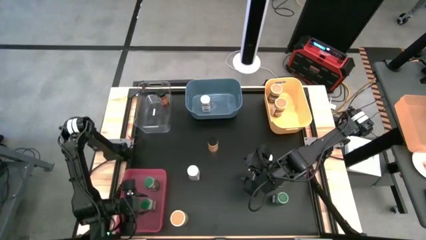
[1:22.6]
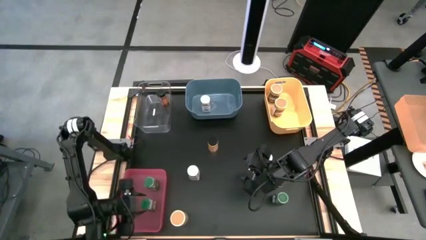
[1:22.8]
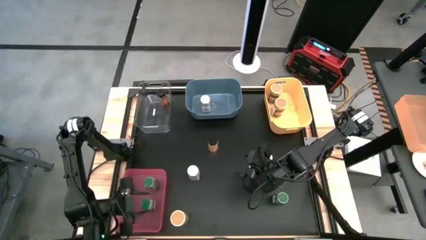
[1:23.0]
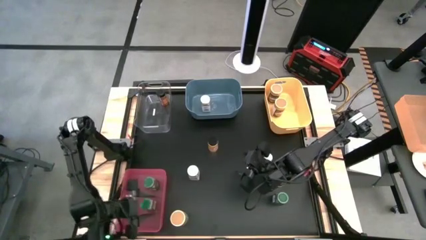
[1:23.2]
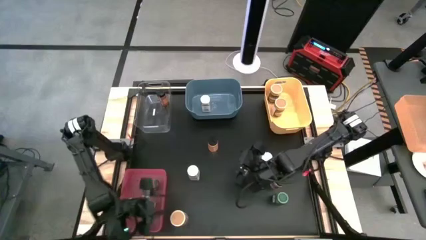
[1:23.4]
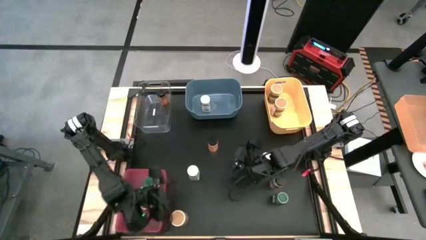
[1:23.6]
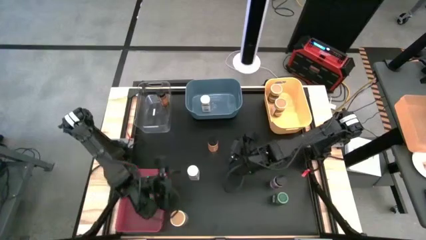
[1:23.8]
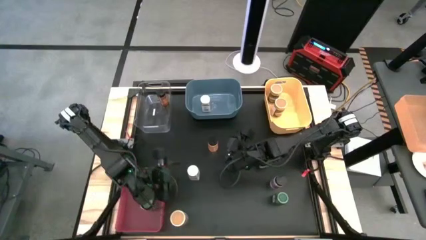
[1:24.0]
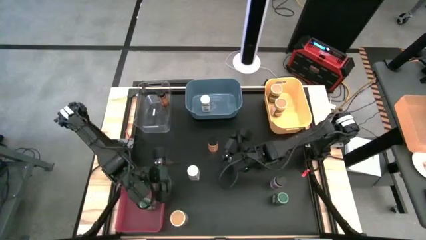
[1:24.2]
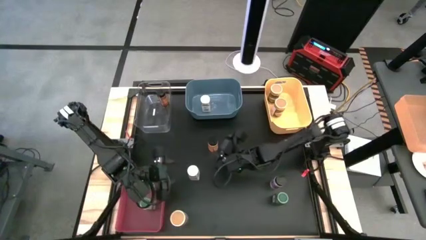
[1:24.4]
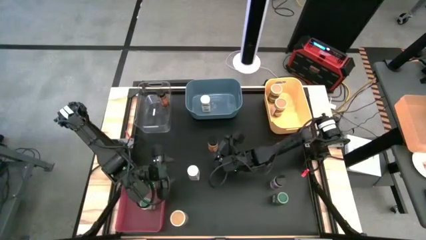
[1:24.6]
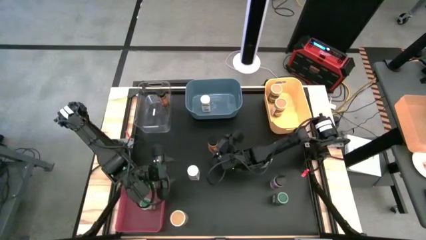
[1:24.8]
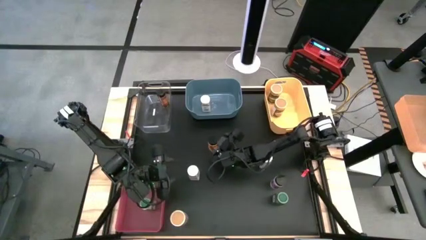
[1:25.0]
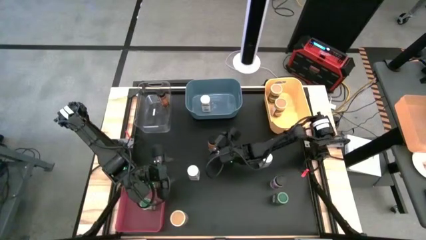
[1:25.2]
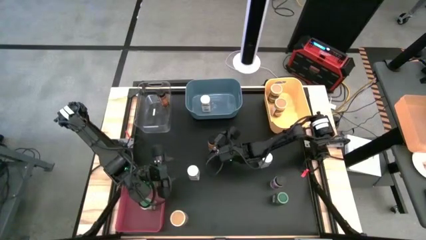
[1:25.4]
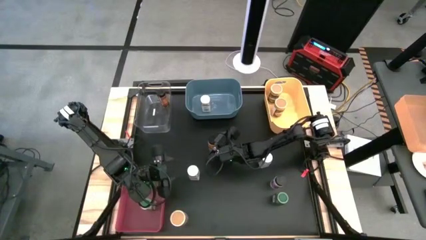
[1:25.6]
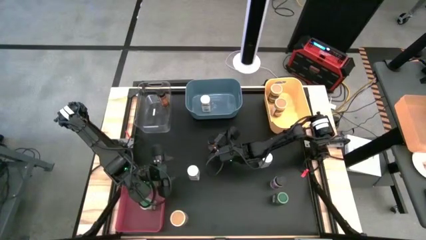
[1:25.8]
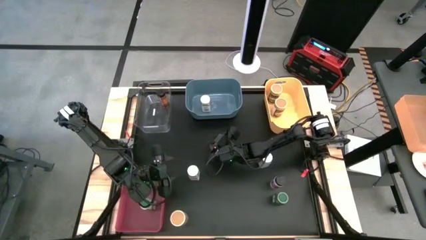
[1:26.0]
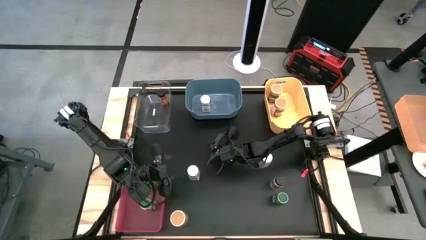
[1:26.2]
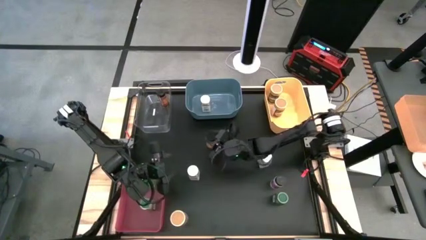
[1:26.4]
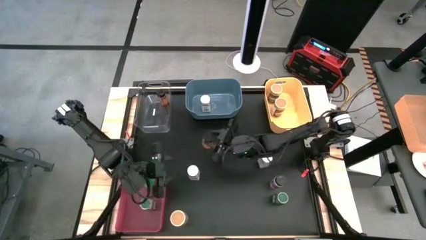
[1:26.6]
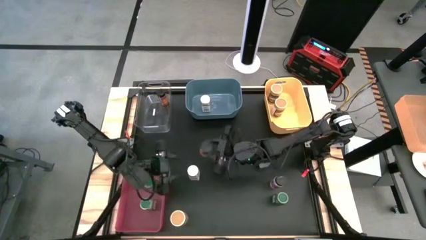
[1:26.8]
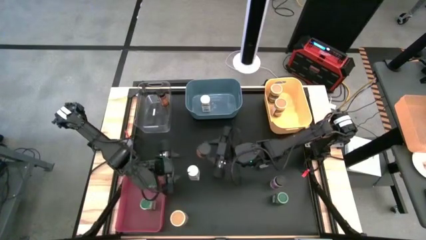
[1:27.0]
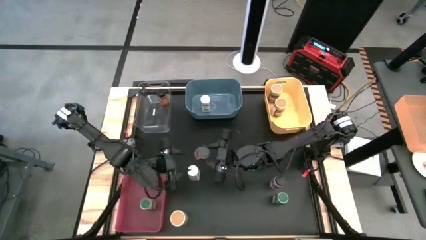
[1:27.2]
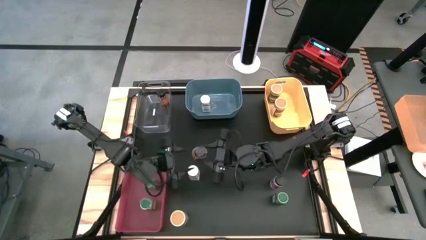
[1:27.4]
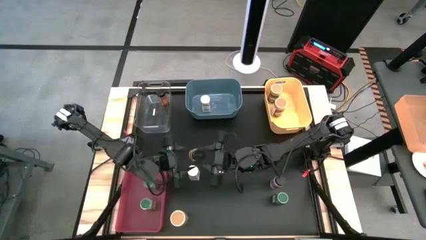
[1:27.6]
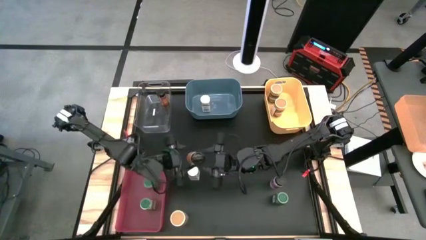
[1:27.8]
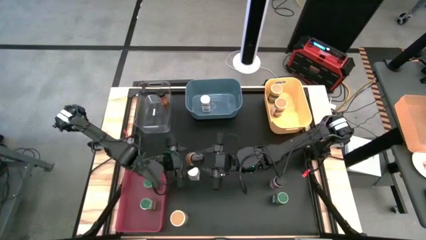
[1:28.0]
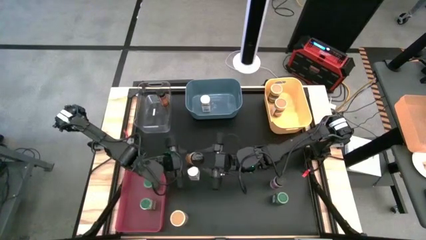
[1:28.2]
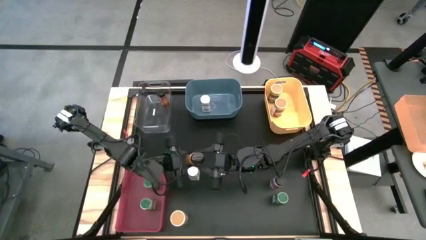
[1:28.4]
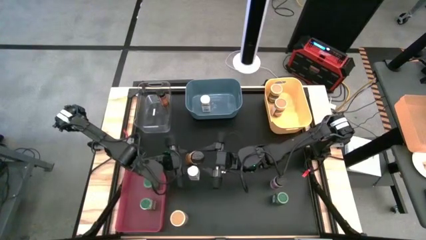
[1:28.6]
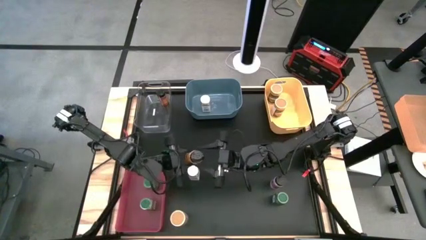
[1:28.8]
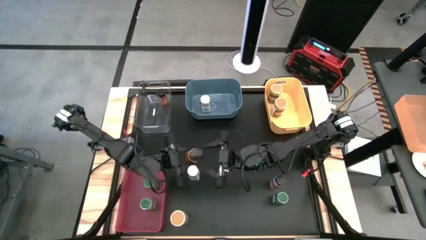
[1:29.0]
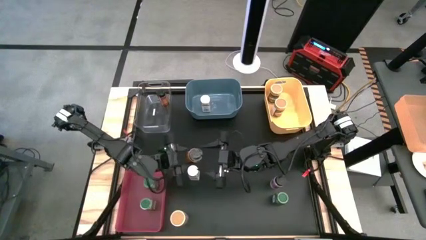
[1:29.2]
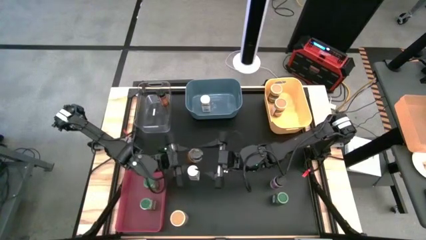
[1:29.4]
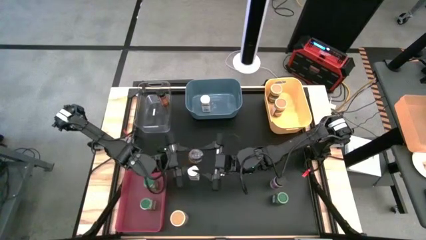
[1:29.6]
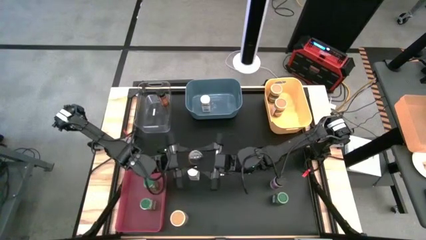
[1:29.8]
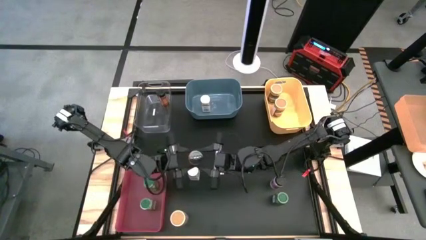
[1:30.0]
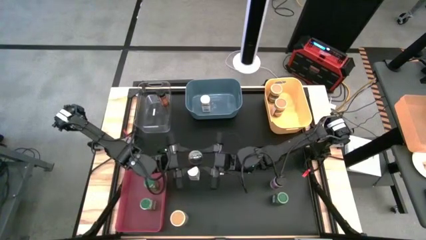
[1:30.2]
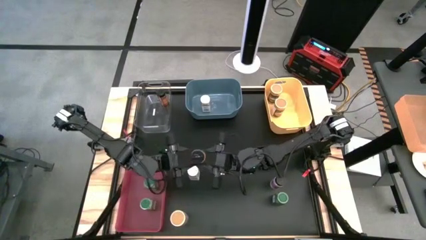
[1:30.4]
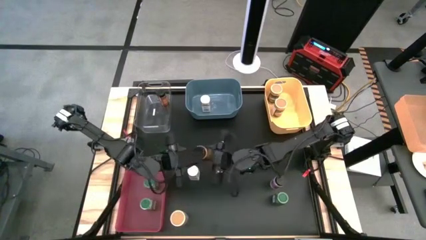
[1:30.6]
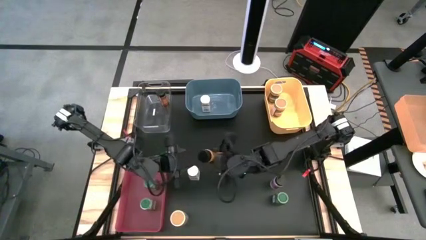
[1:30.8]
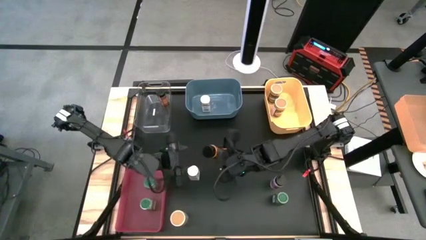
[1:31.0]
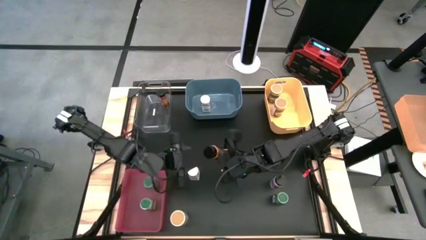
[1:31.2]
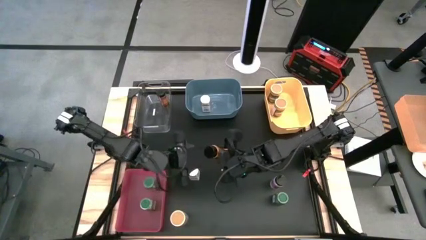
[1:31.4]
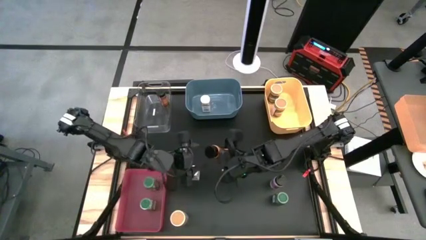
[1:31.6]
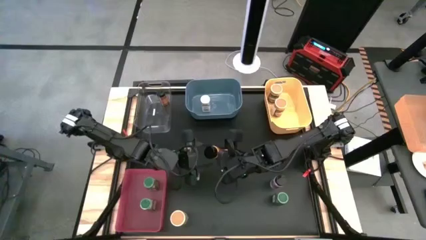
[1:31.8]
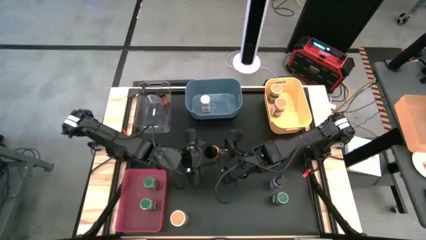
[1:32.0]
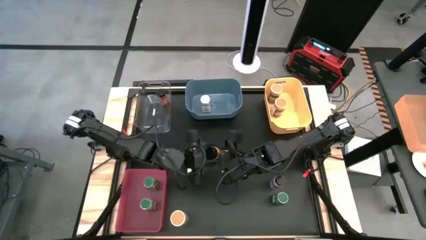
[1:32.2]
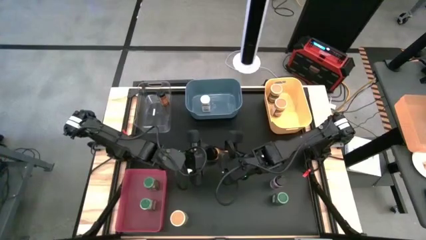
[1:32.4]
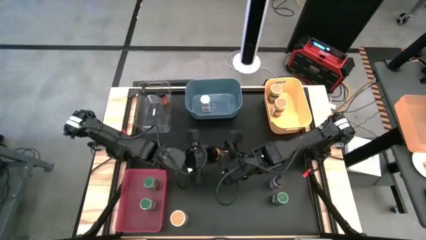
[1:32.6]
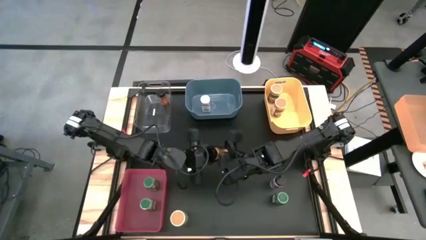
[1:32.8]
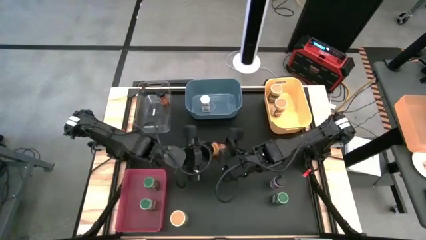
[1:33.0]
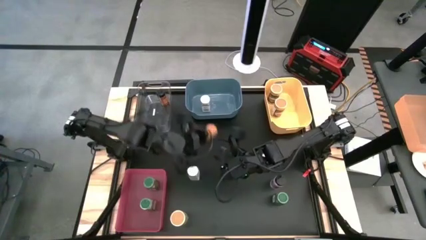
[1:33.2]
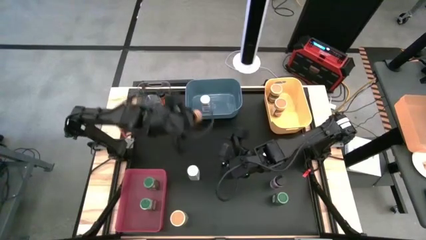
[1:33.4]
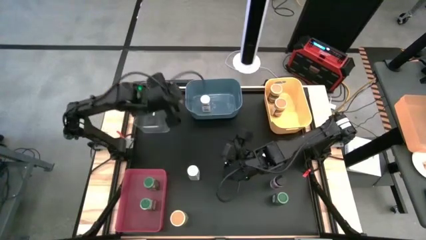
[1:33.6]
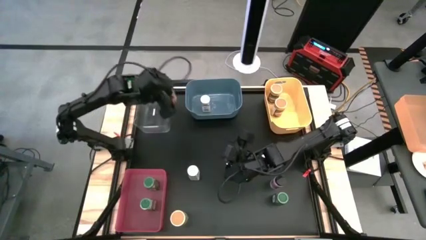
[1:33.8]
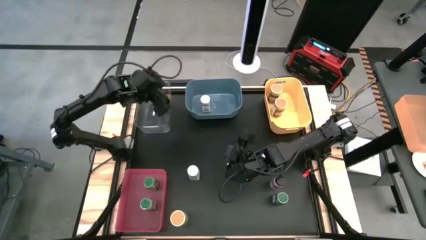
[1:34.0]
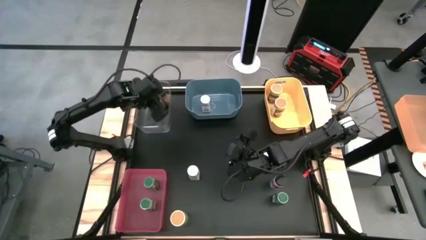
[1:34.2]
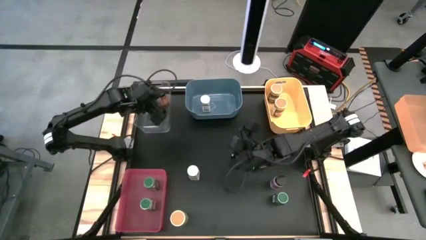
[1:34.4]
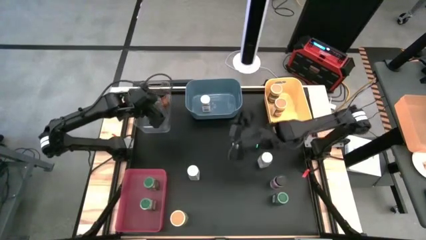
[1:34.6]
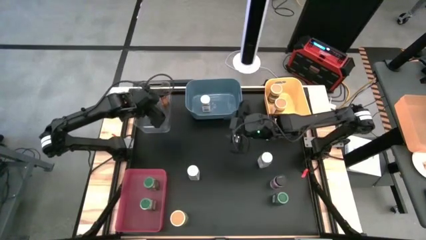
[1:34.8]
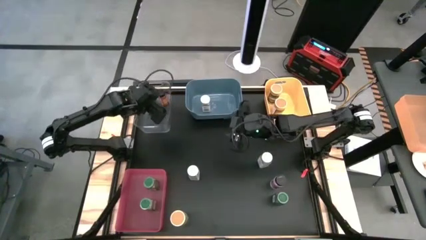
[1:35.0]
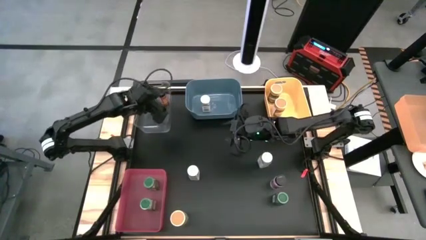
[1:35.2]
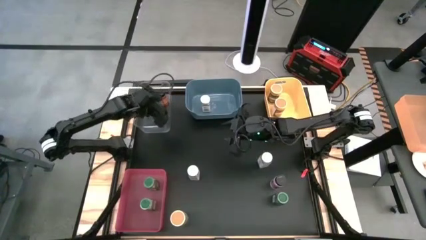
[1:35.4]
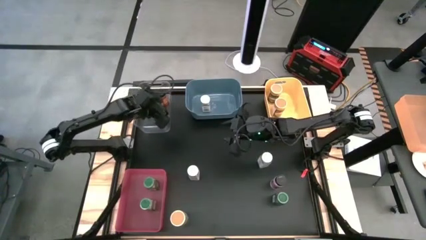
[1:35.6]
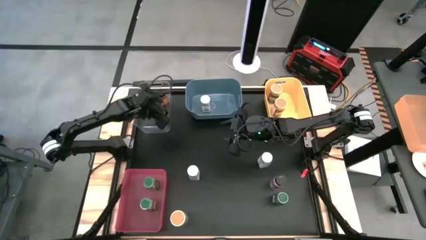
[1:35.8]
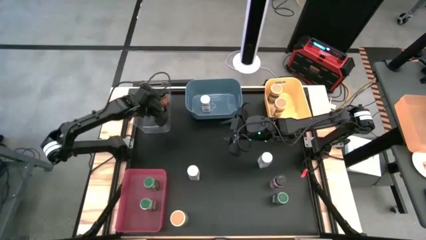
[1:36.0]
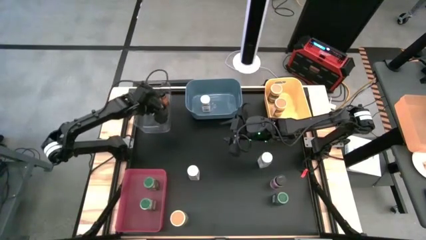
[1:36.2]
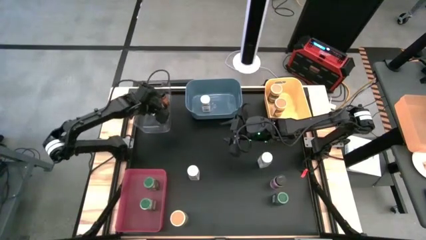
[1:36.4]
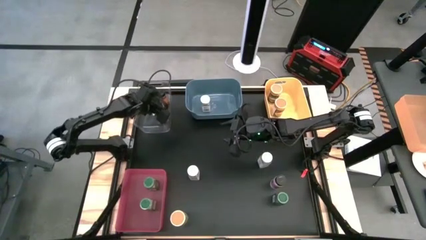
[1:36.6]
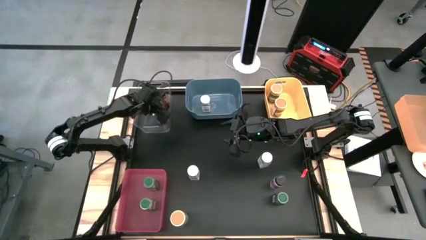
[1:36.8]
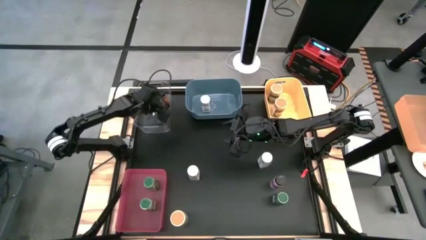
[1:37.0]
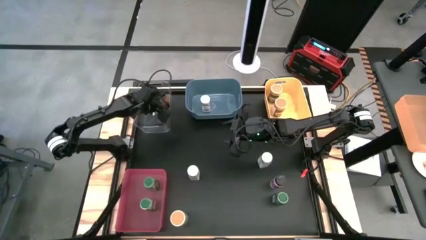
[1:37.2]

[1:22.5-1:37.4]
Task: Sort spices by type
Put the top black seasoning bottle into the transparent bin

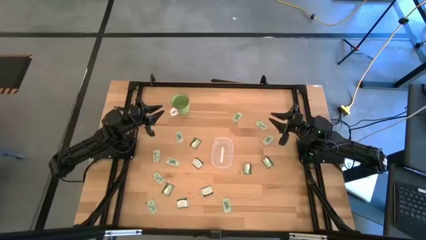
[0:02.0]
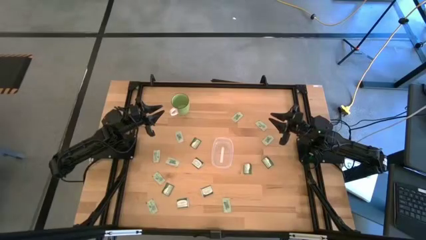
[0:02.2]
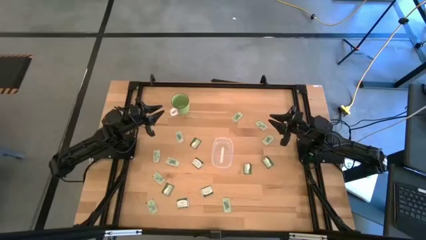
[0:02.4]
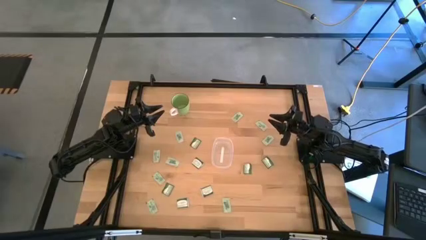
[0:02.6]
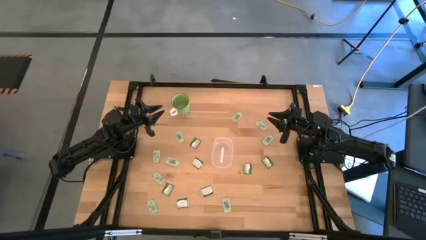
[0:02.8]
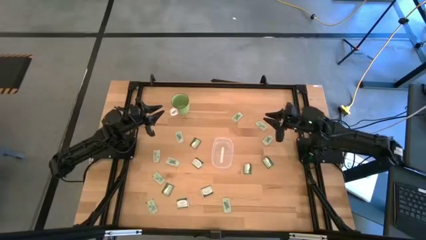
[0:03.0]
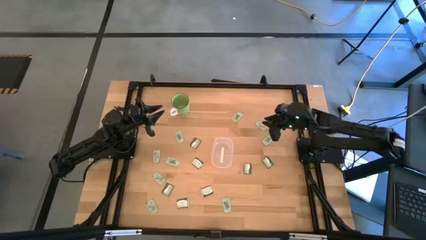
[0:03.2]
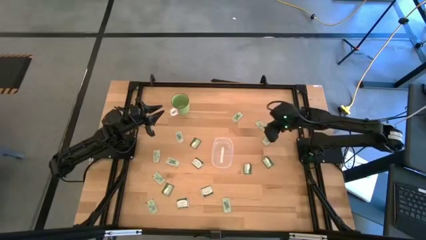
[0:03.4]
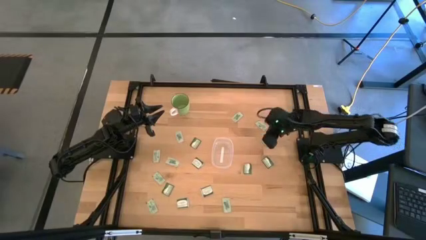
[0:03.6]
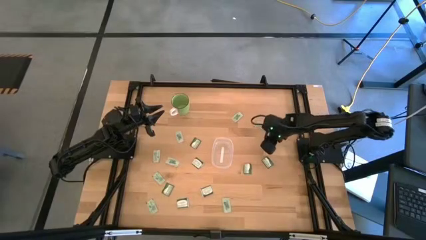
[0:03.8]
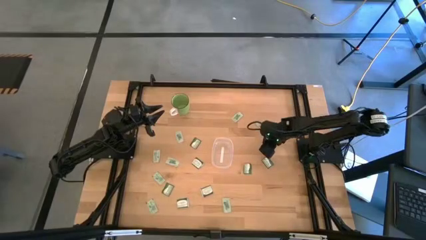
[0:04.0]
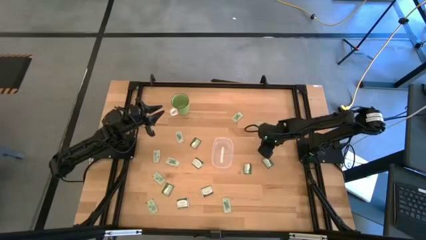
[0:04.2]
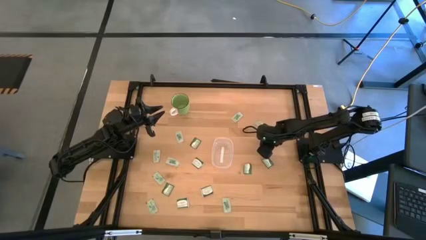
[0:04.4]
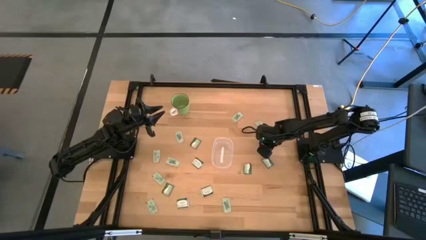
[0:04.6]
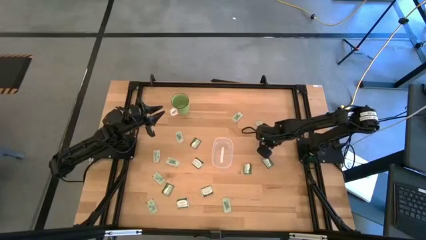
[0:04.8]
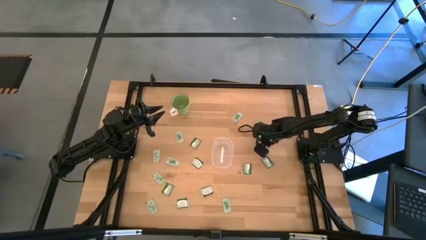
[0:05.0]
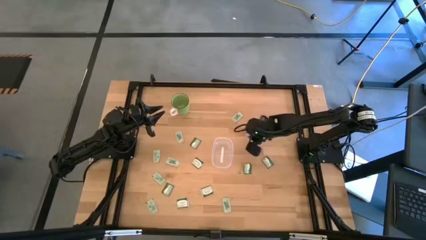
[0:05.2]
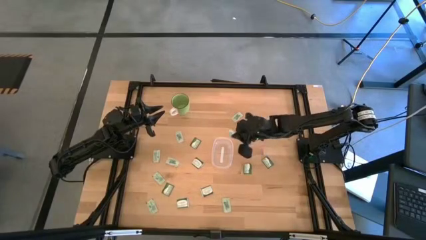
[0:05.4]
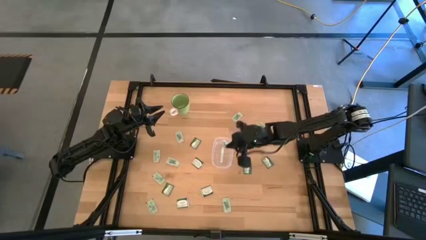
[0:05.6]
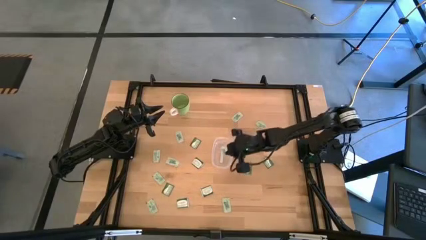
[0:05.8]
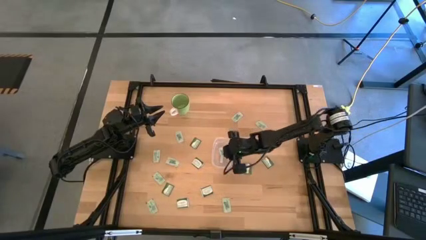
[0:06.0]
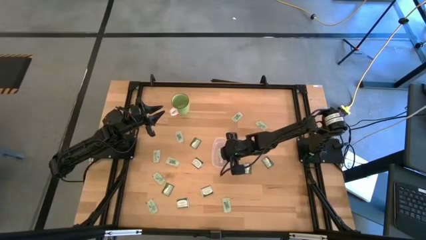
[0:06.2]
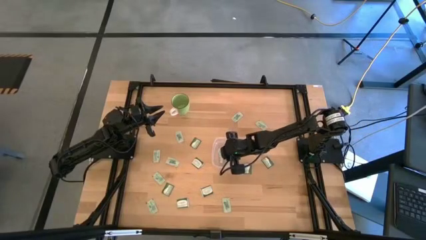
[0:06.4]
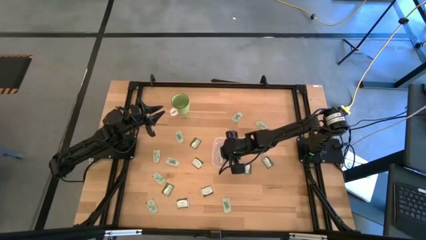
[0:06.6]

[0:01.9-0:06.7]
Task: Pick and place items into bin
Put the stevia packet into the transparent bin
